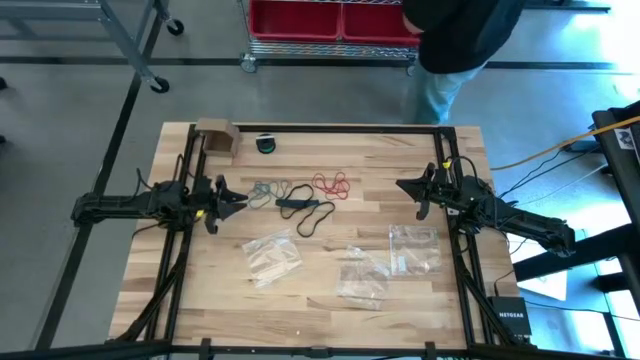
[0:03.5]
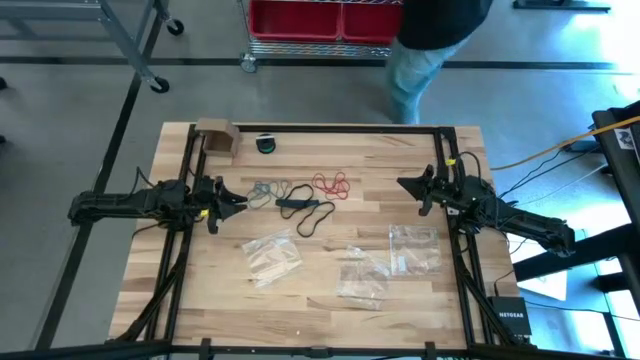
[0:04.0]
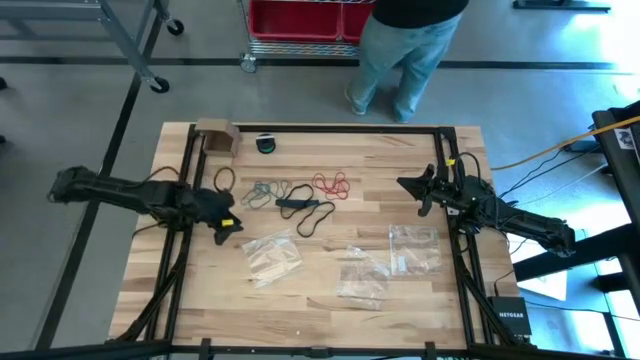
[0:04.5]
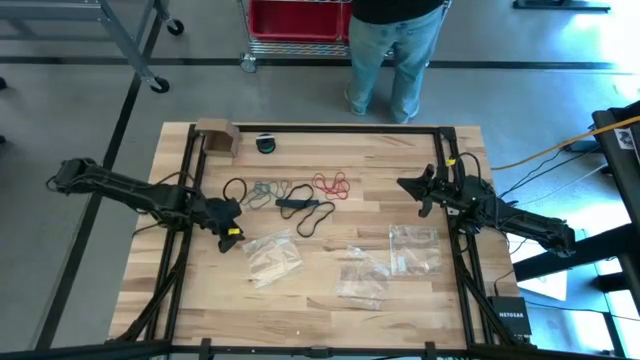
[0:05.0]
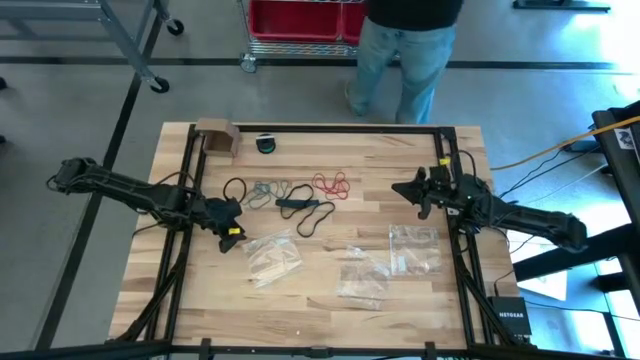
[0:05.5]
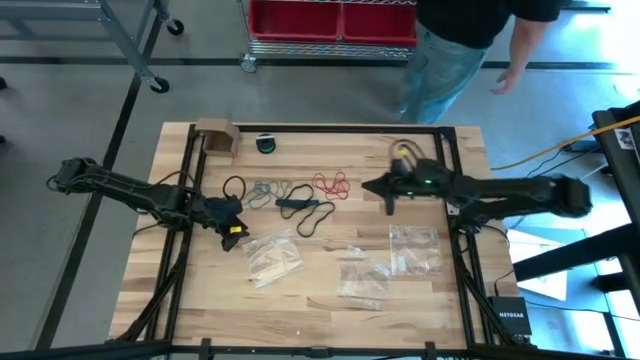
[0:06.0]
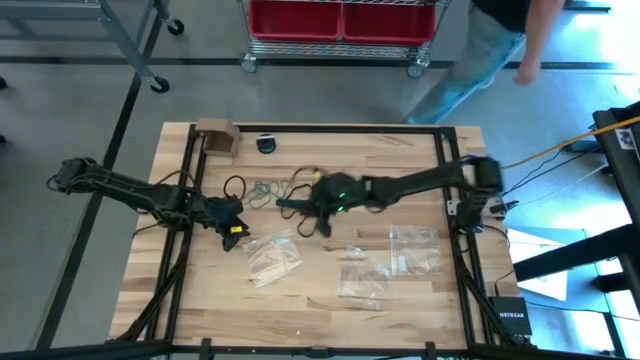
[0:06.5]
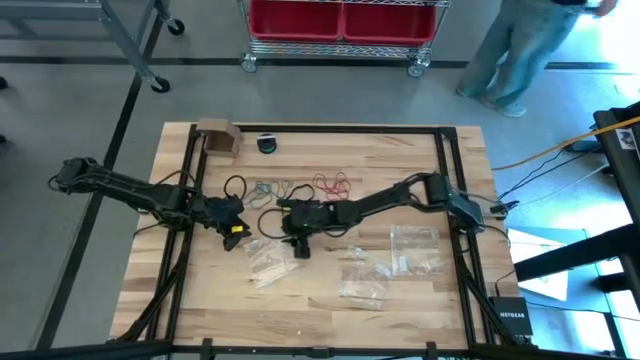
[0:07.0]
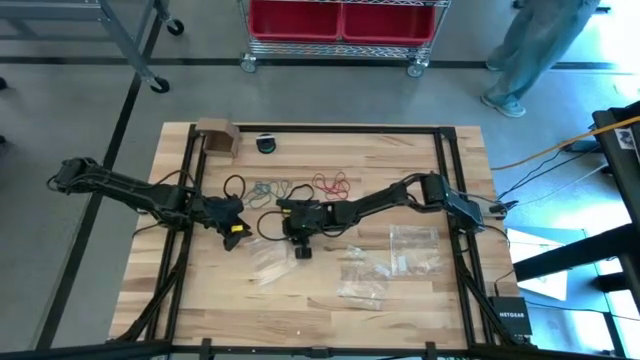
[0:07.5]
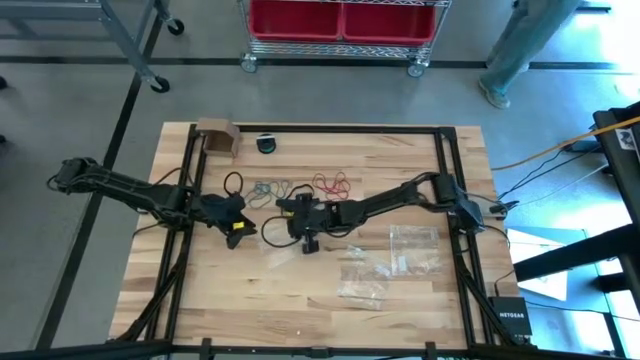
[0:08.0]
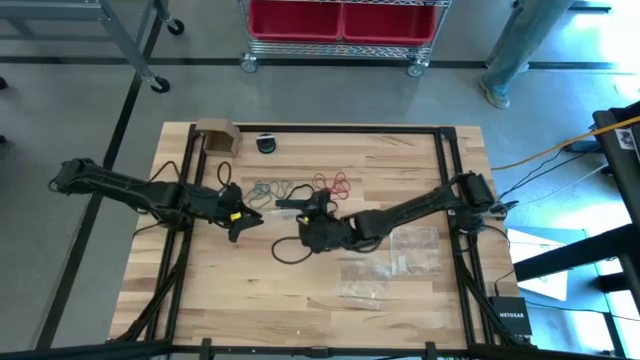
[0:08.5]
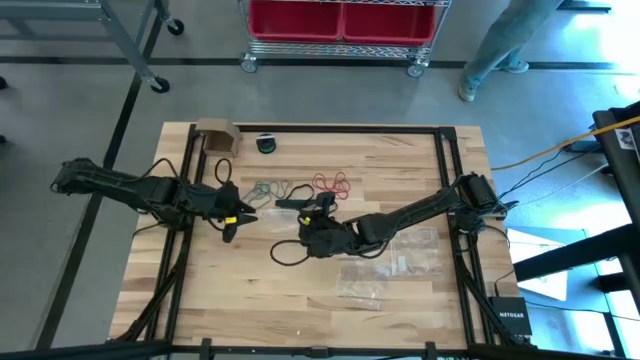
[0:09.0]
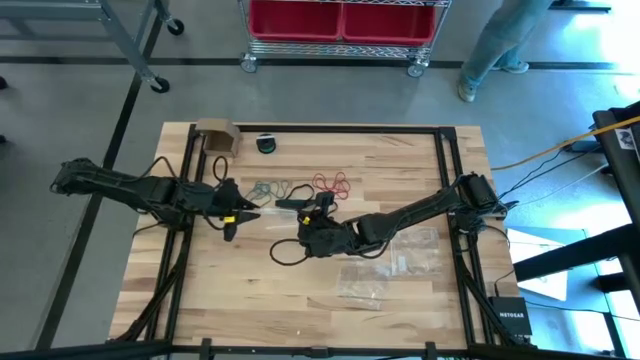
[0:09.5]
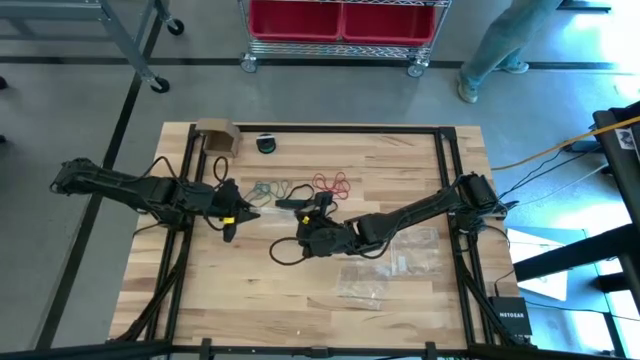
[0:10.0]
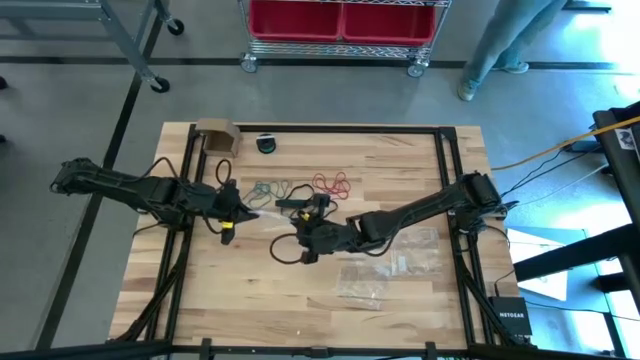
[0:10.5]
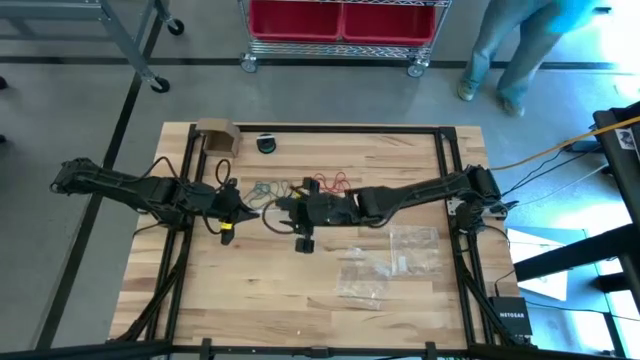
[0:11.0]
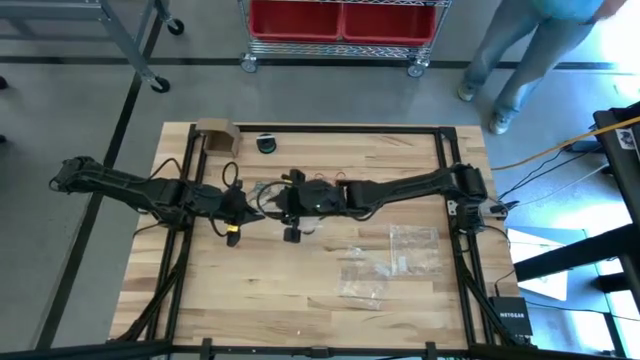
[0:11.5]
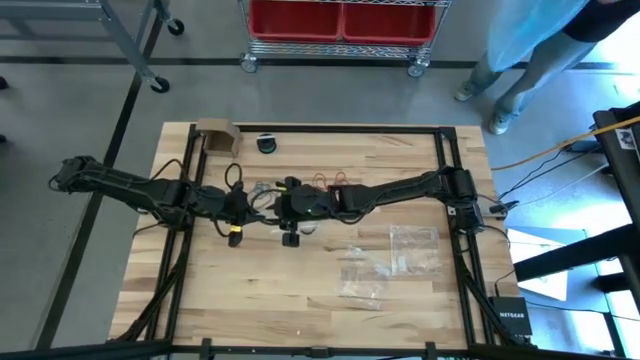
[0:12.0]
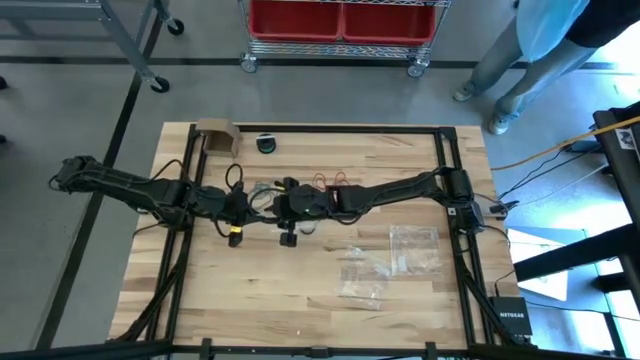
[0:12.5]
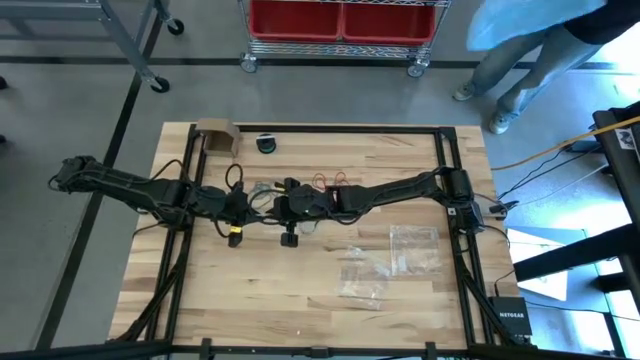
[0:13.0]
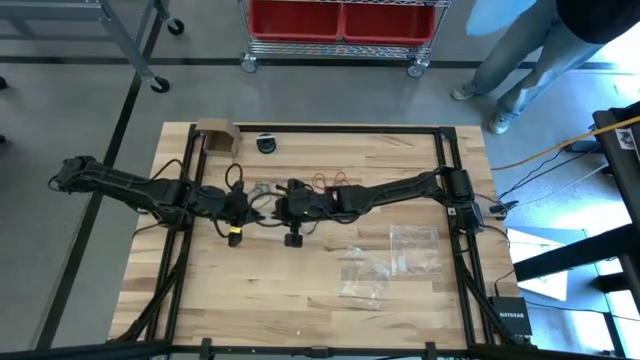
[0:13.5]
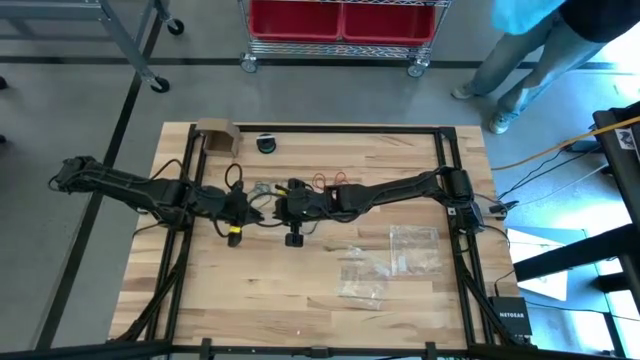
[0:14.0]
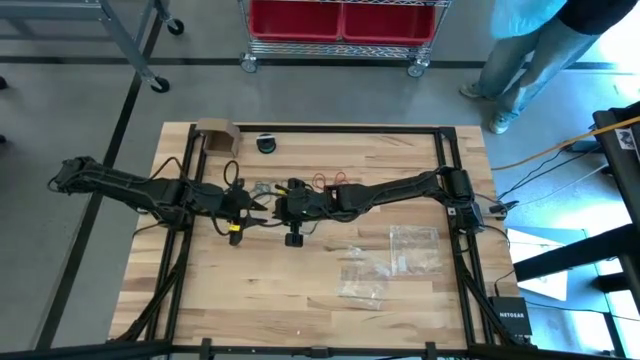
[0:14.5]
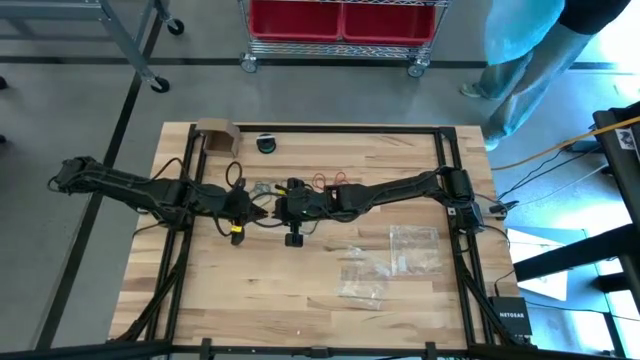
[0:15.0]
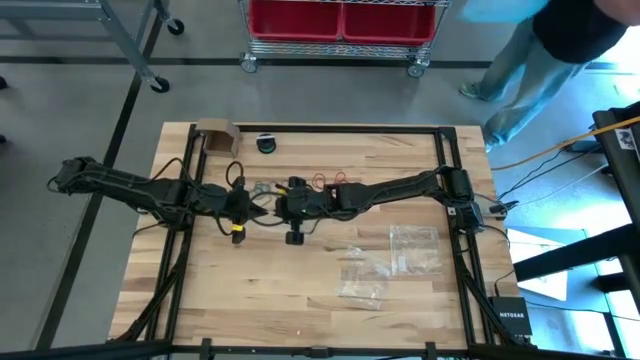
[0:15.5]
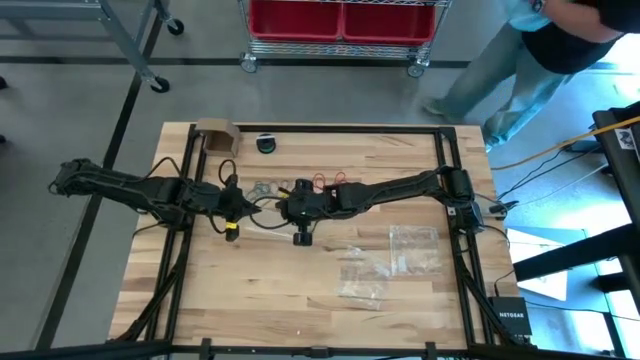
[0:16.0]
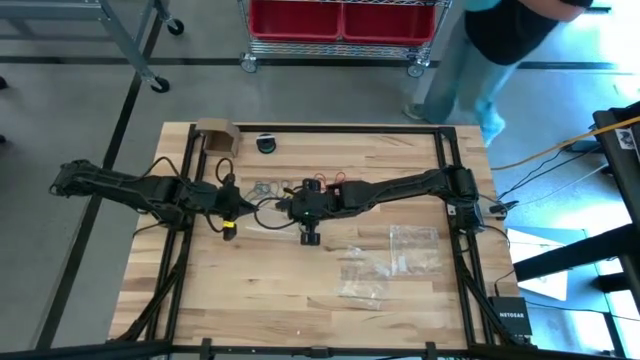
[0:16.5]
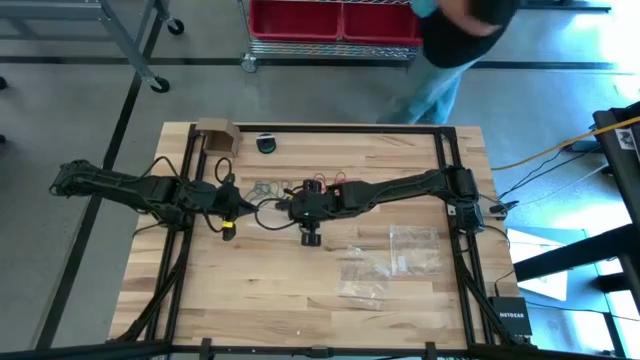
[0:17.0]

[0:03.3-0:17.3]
Task: Sort rubber bands
Open the transparent zip bag

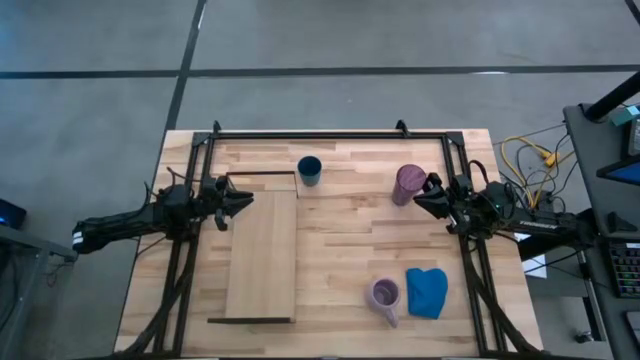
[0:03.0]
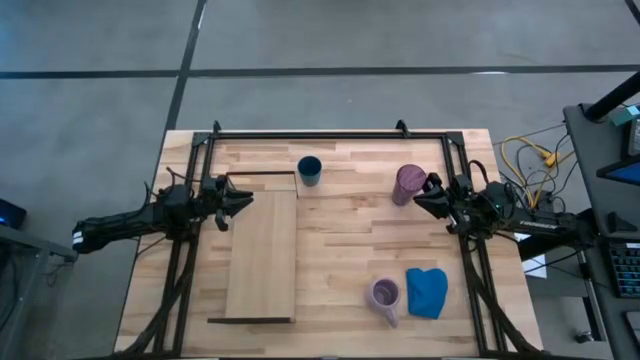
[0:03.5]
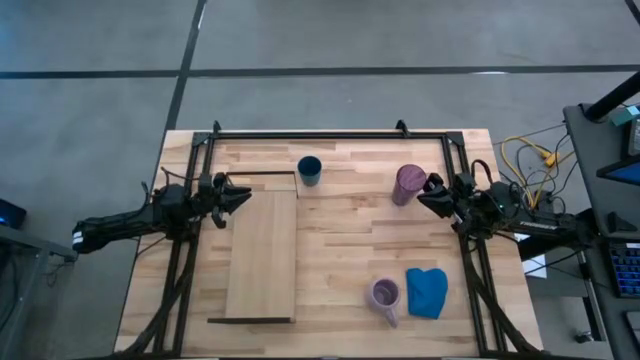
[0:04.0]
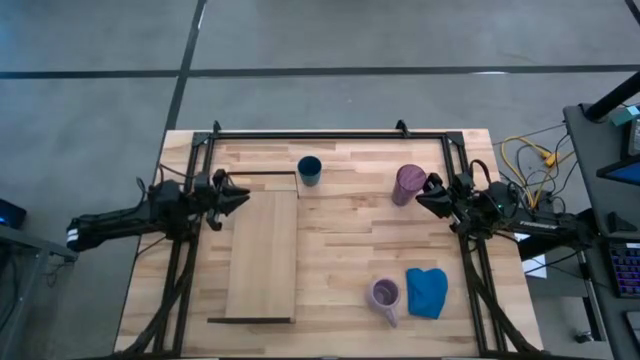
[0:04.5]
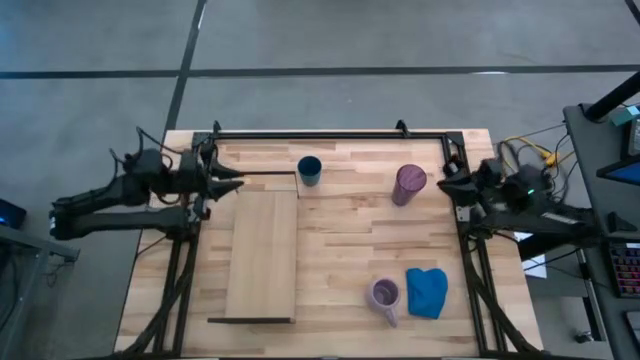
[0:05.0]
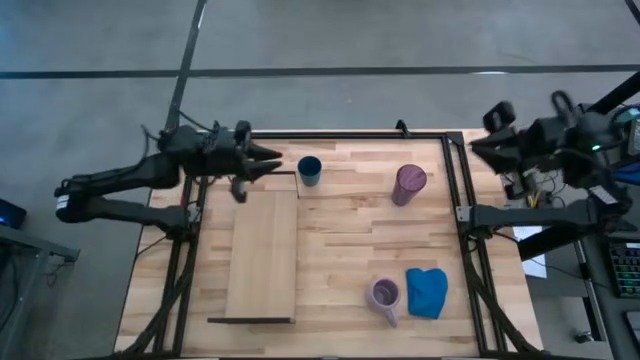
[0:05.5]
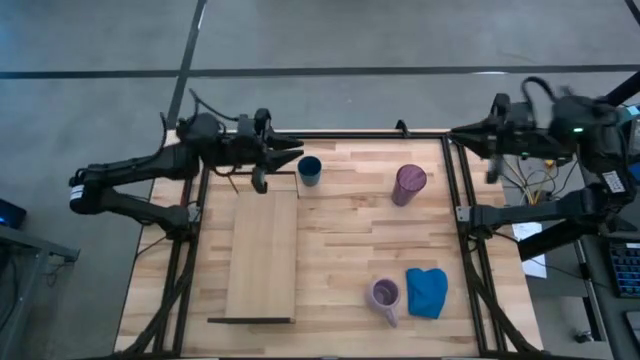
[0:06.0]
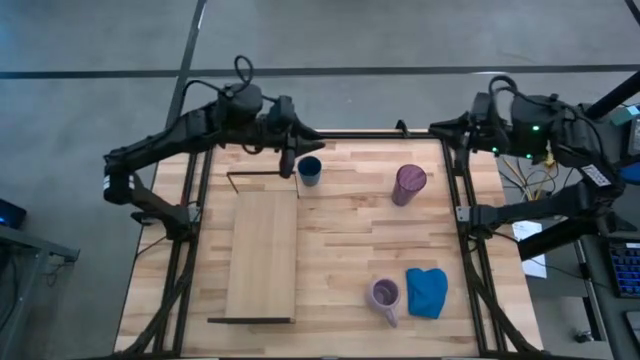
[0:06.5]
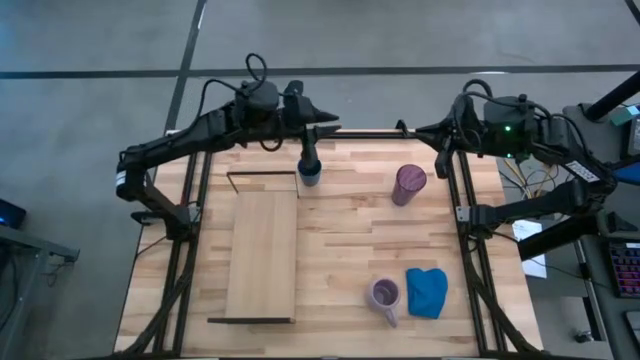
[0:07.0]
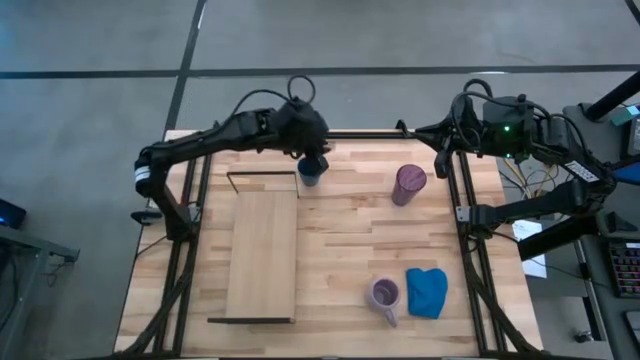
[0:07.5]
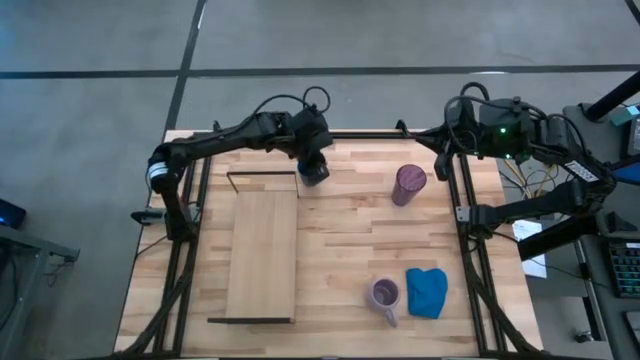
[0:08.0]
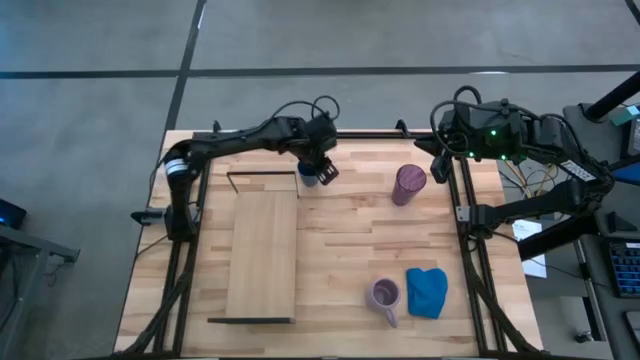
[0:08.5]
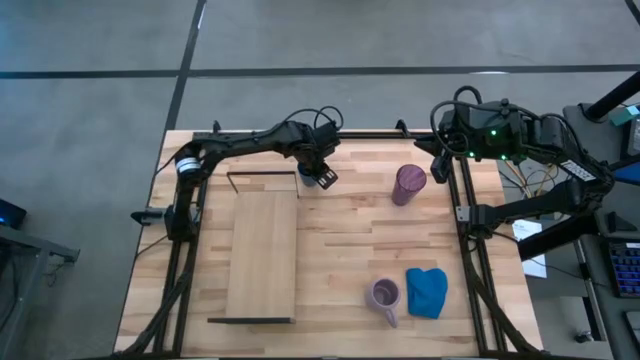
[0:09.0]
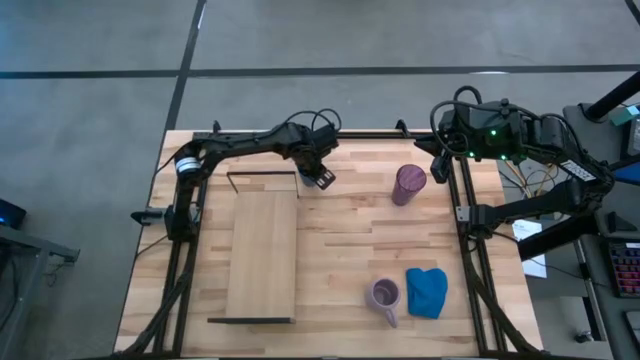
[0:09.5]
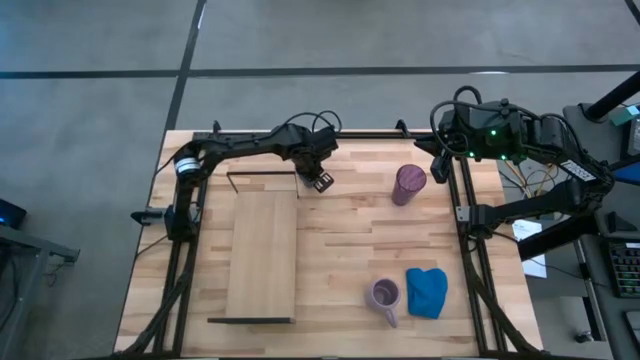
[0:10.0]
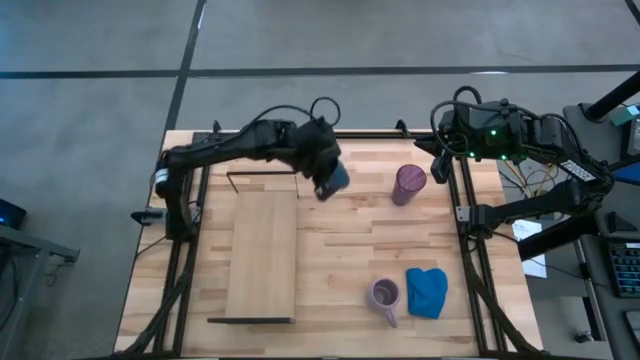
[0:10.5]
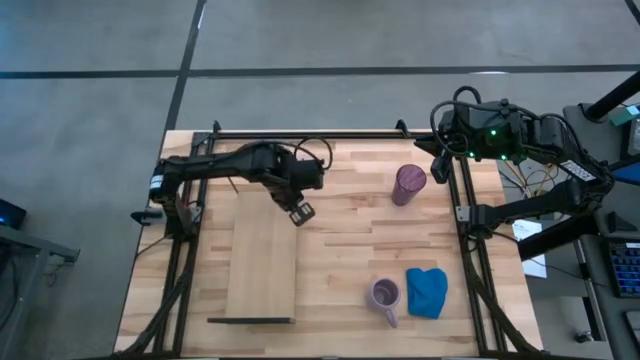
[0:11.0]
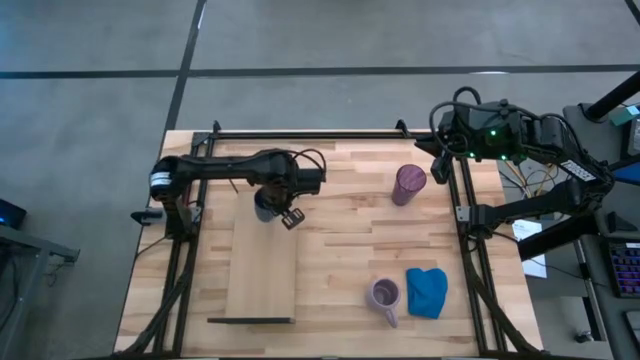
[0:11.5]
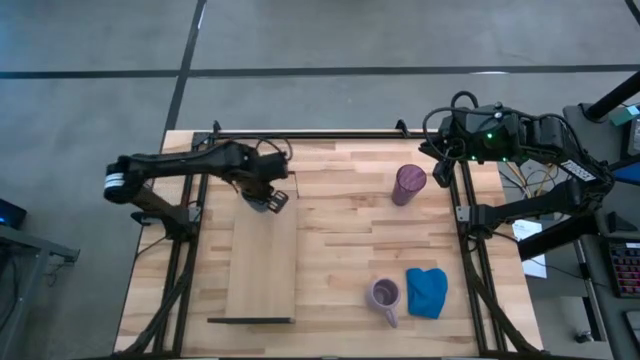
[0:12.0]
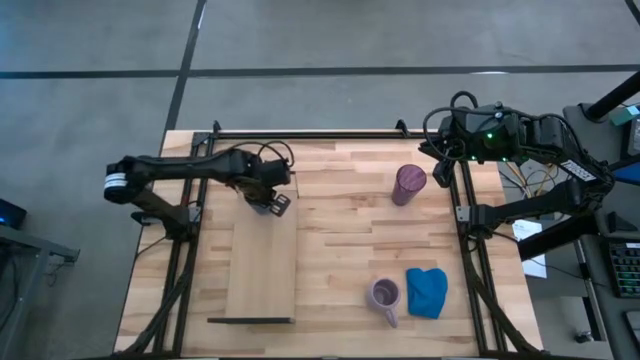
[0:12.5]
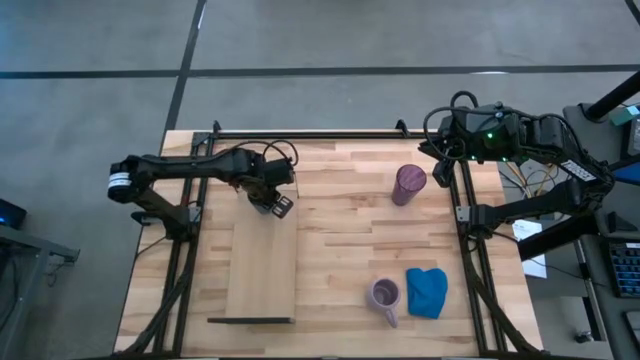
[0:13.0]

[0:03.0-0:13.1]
Task: Stack small to large cups/mugs on shelf
Put the blue cup on the shelf
